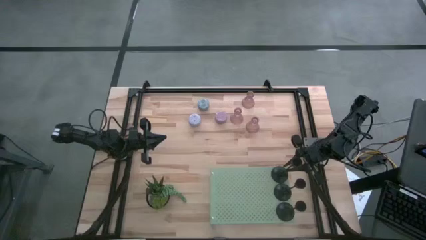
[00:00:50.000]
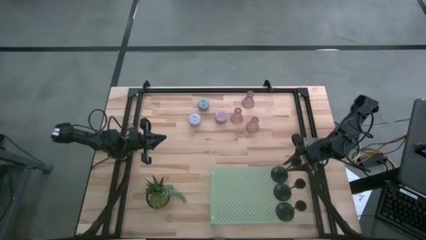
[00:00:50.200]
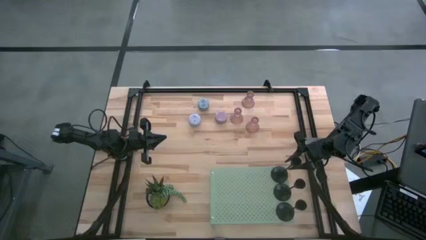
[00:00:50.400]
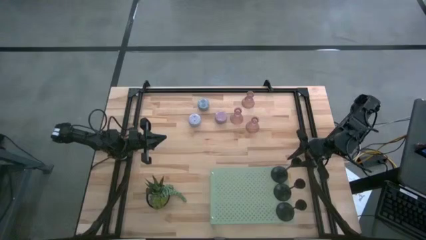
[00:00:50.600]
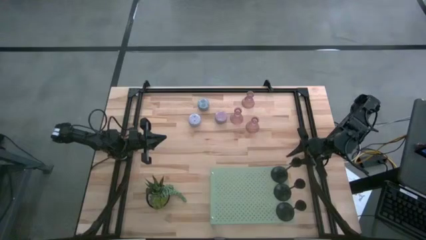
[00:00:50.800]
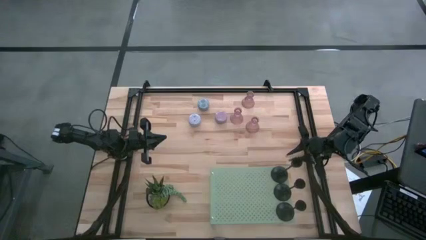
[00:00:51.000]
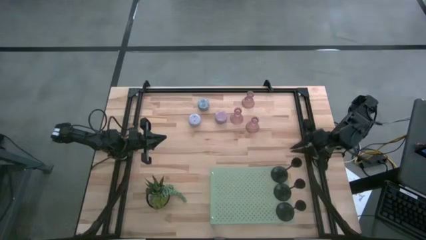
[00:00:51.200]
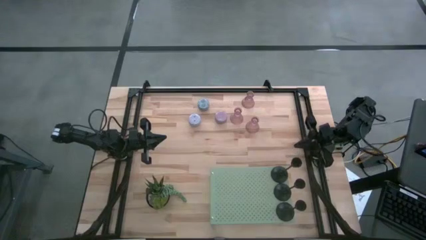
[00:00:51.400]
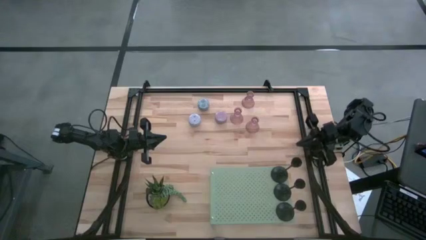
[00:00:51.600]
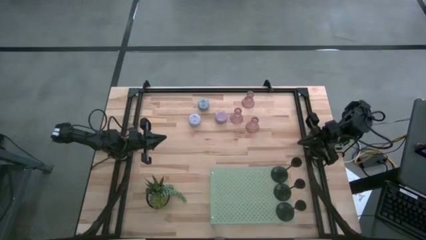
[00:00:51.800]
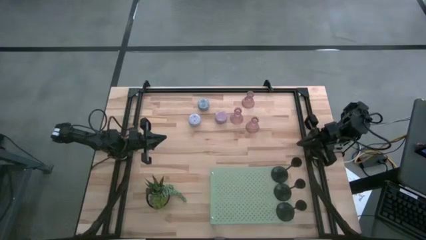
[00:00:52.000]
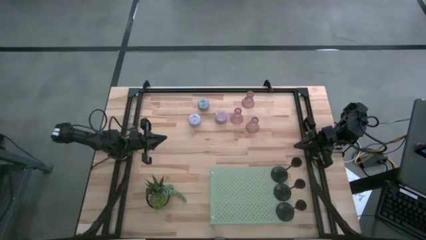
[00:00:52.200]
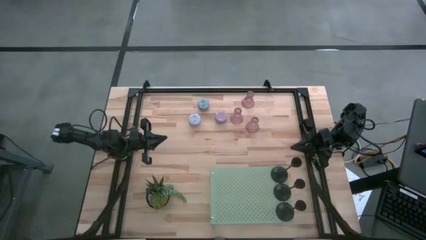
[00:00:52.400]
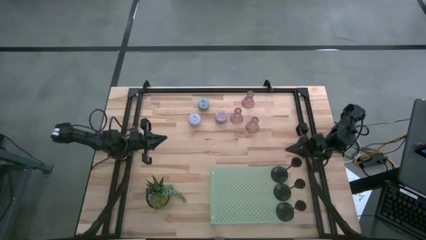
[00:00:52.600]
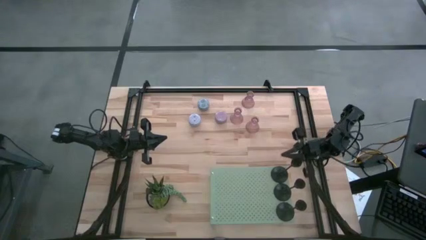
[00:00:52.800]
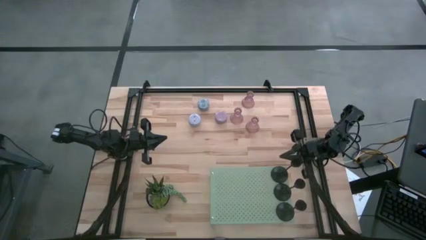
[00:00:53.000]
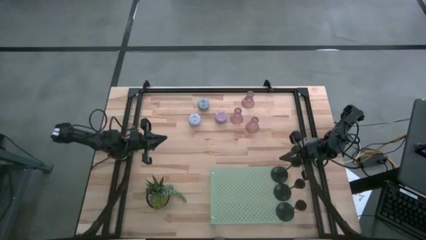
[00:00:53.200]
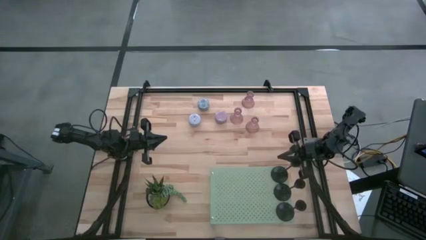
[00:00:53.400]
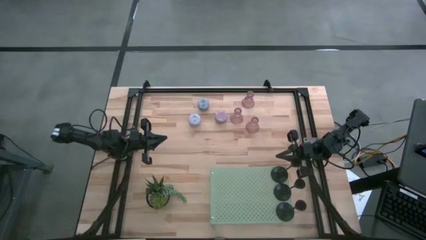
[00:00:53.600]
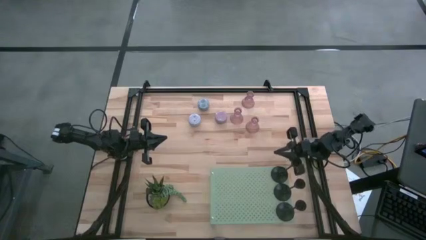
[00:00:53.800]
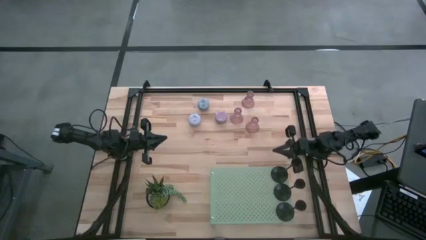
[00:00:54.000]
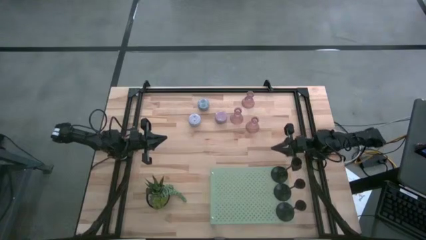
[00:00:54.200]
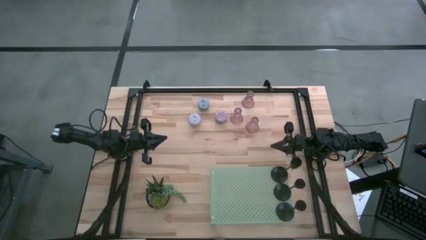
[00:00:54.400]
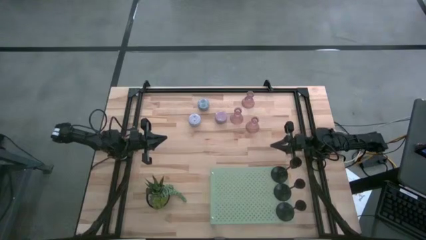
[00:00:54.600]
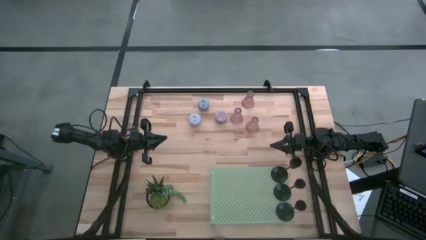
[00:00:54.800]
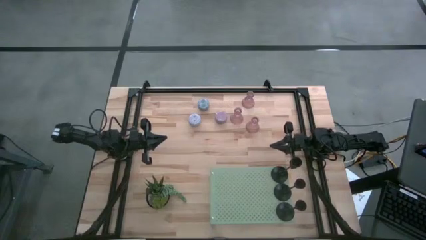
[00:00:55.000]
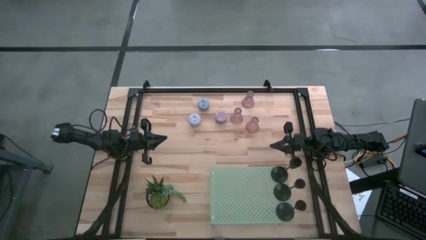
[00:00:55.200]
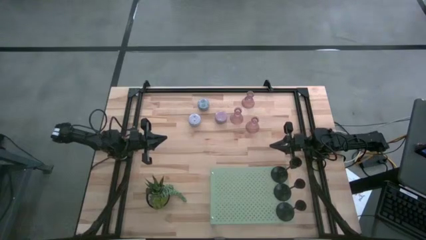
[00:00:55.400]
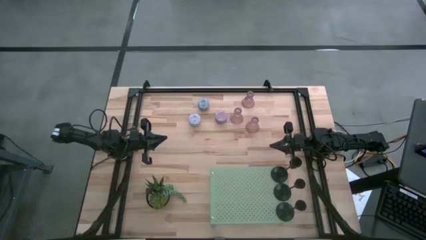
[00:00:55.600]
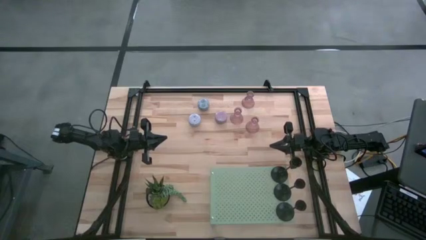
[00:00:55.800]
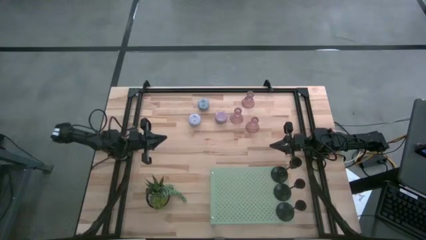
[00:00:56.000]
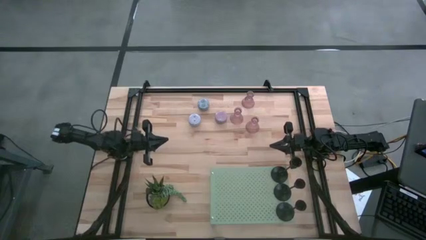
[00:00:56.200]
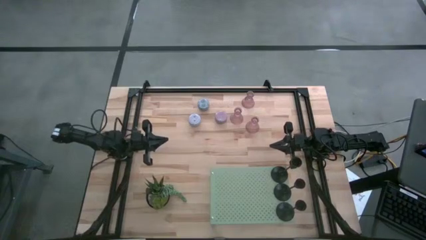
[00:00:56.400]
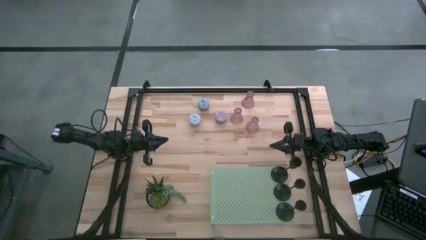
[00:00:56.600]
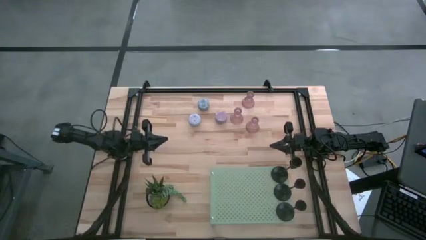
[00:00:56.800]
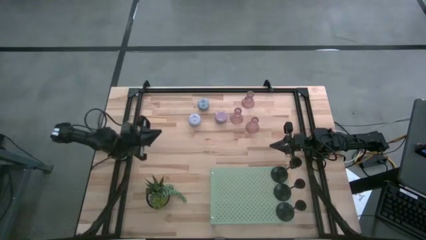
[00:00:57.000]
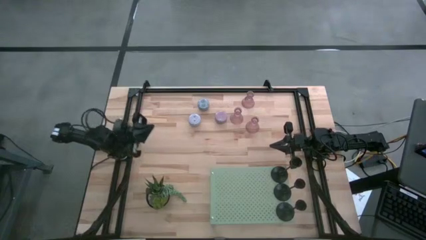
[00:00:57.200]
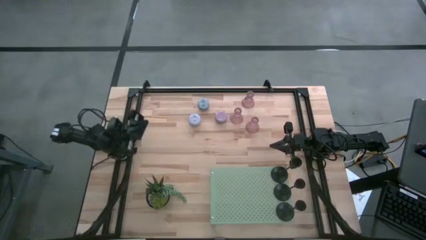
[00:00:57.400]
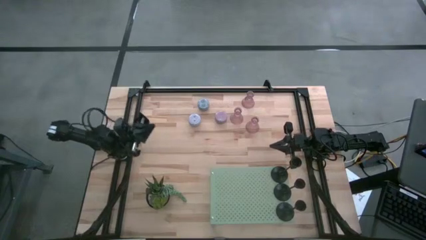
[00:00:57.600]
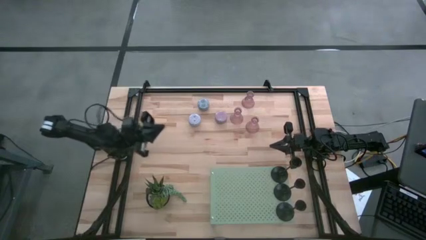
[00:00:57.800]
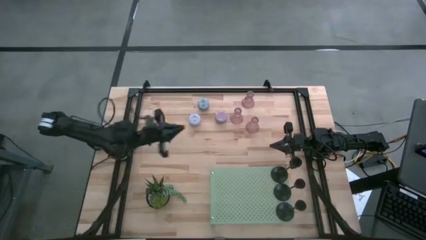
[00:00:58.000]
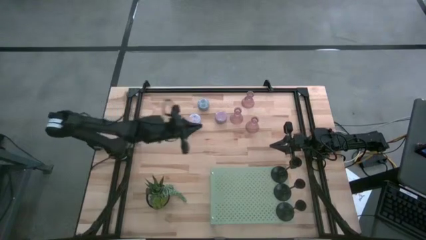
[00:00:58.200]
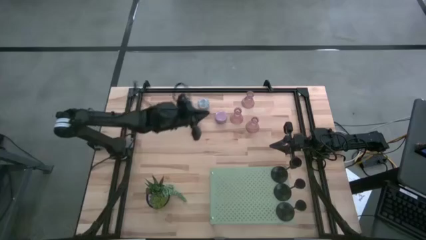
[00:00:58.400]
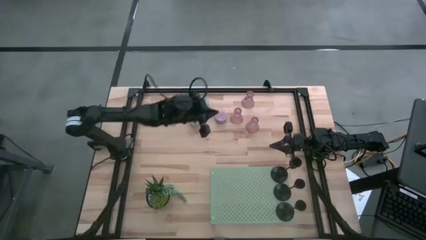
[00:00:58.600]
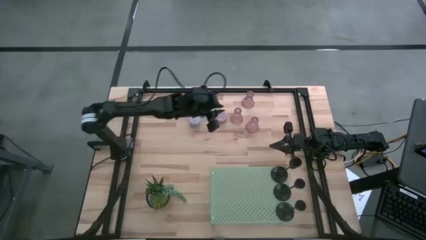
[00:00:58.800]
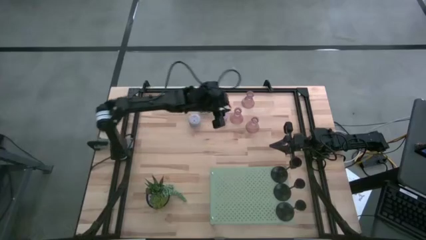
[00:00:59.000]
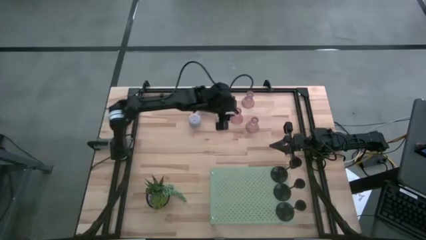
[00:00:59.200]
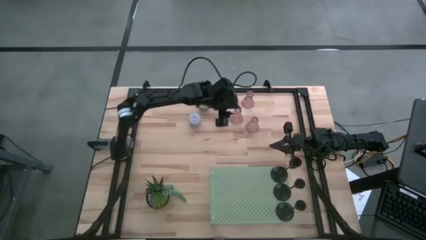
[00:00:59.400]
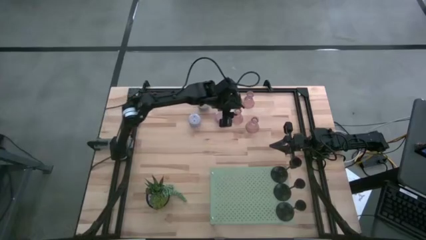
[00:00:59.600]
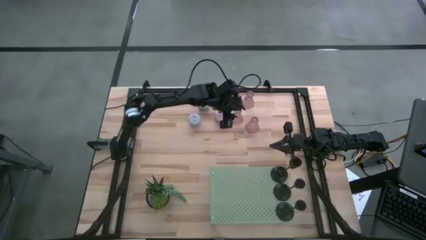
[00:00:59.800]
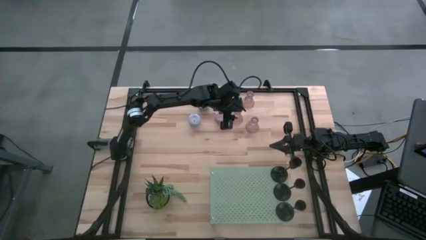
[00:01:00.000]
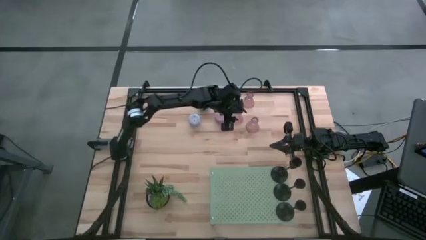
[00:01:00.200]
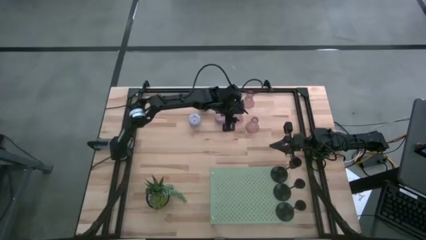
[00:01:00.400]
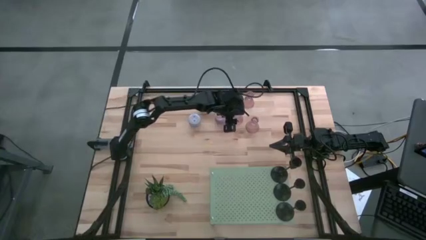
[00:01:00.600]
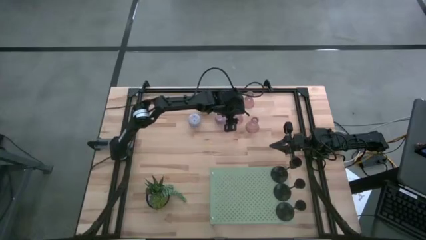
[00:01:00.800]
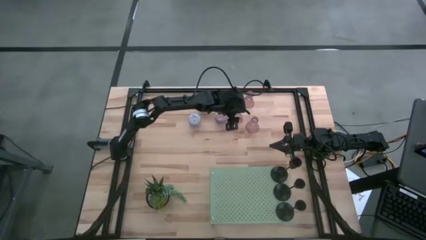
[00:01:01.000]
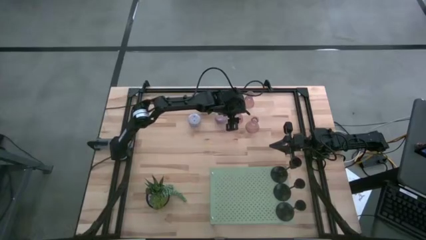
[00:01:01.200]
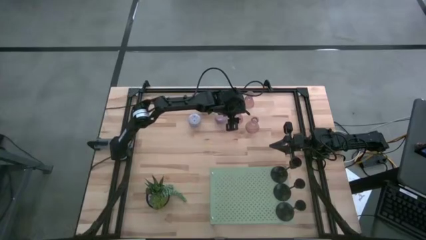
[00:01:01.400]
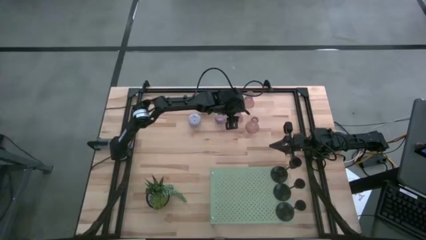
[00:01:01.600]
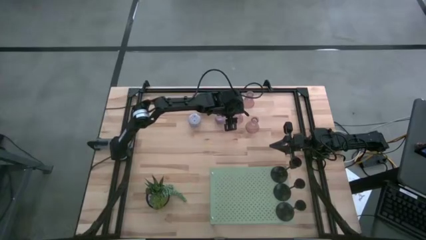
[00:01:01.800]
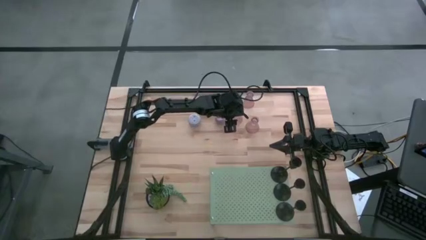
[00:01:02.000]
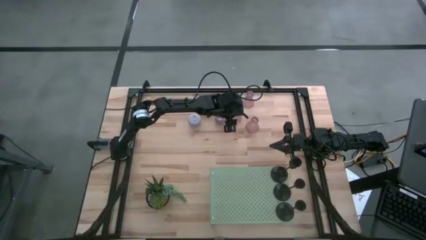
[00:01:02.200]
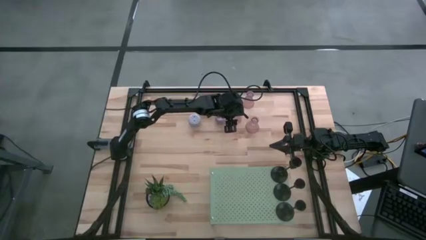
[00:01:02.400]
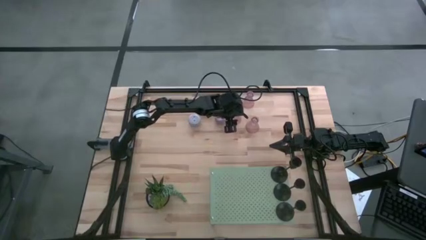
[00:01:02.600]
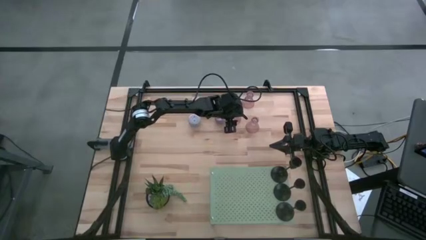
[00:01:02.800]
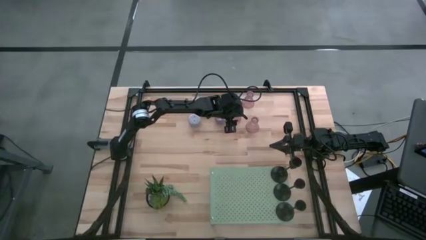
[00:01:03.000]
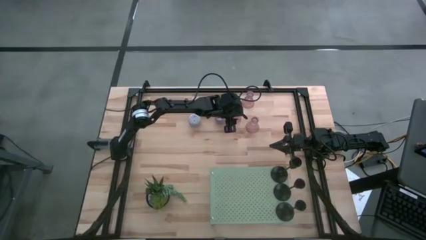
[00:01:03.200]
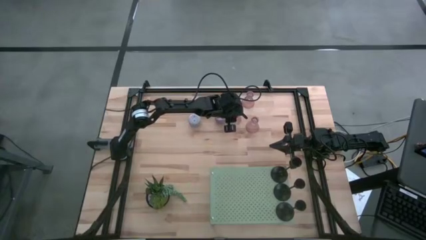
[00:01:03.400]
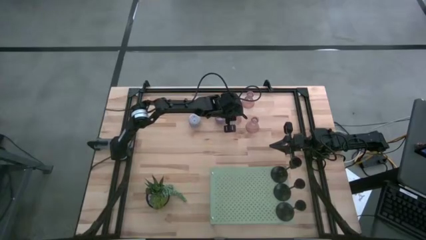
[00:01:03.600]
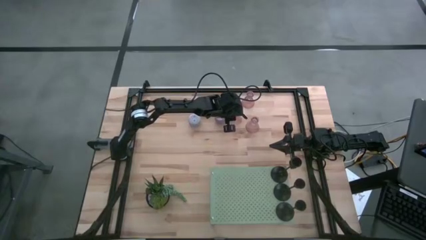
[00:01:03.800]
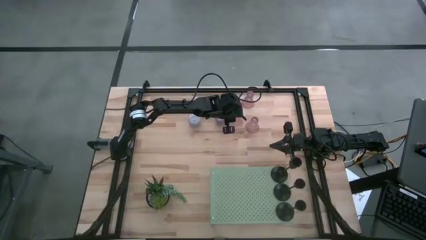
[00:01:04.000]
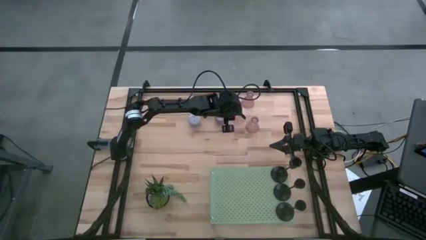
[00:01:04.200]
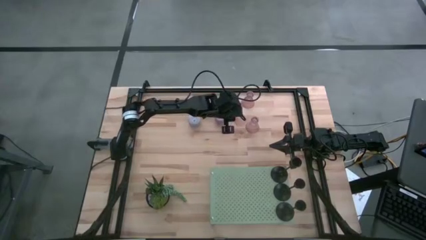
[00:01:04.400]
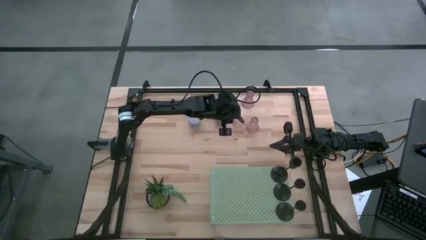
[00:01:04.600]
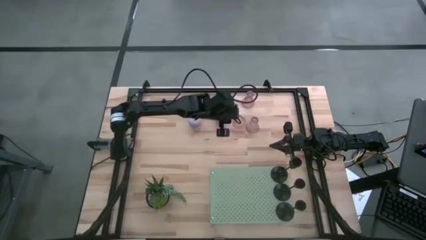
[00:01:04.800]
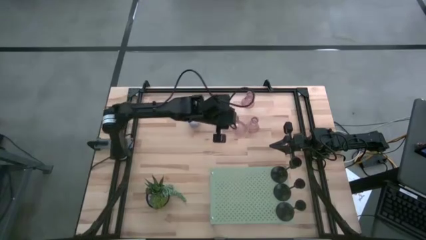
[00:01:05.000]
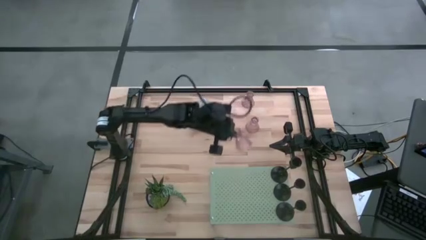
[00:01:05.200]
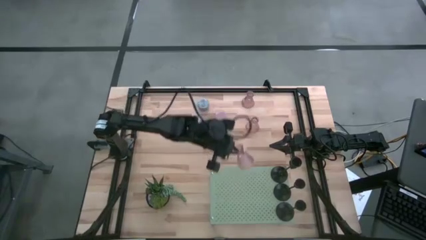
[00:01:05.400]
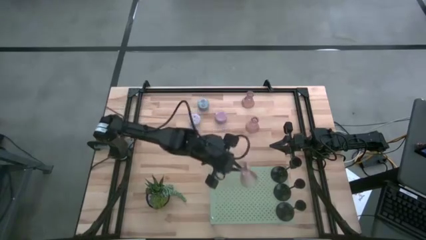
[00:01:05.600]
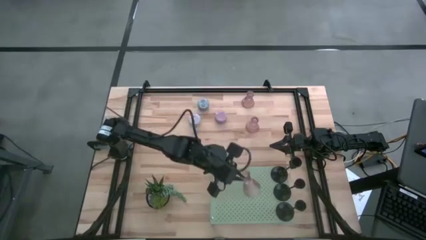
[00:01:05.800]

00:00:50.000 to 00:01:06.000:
Task: Pick & Place candle stick holders
Put the middle pink glass candle holder on the shelf
